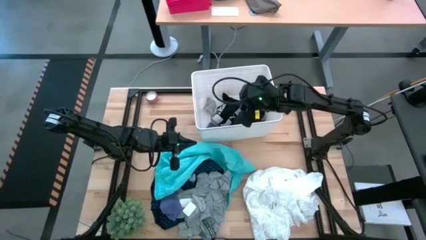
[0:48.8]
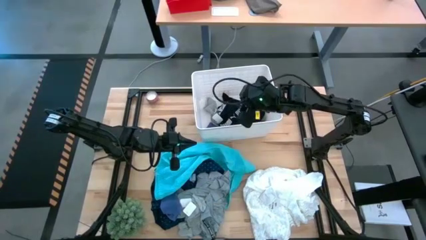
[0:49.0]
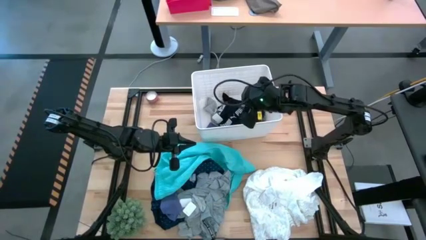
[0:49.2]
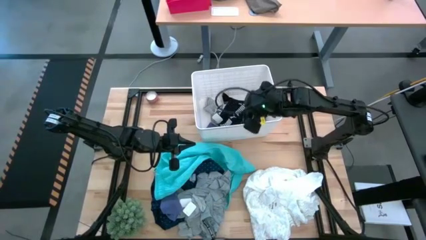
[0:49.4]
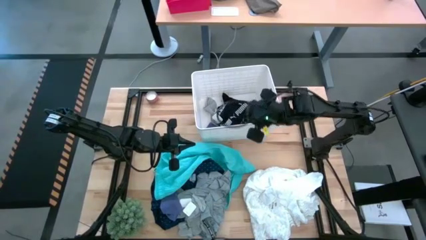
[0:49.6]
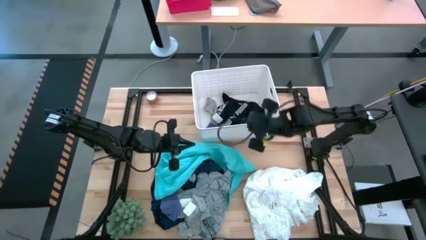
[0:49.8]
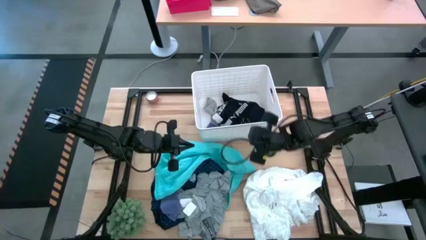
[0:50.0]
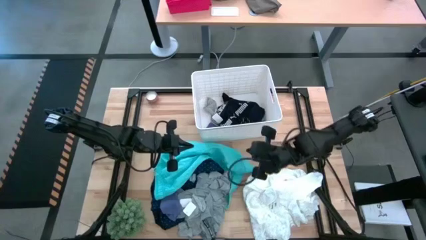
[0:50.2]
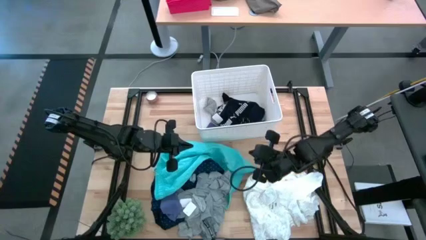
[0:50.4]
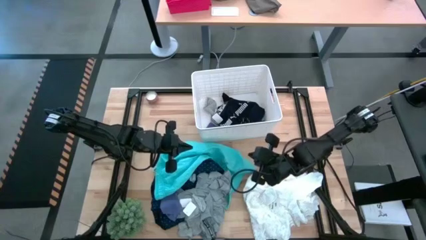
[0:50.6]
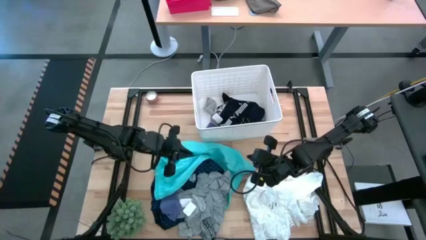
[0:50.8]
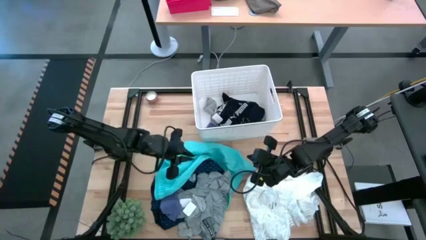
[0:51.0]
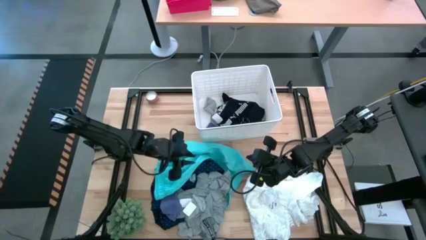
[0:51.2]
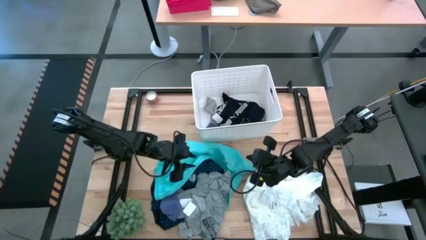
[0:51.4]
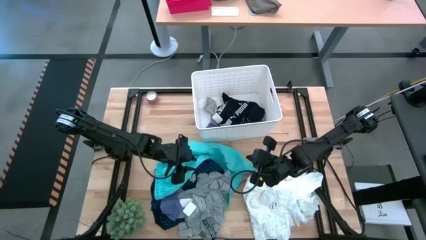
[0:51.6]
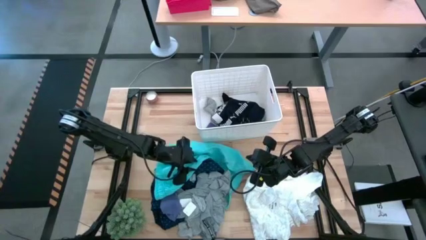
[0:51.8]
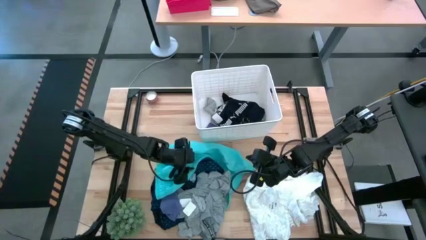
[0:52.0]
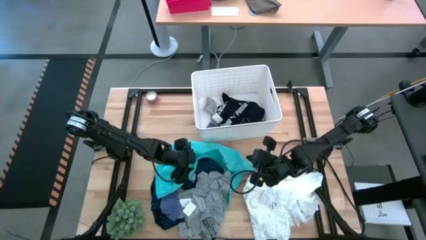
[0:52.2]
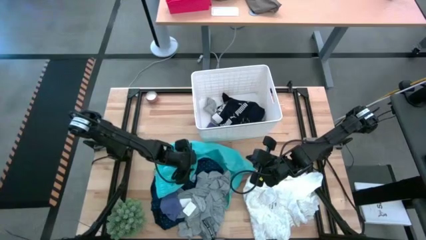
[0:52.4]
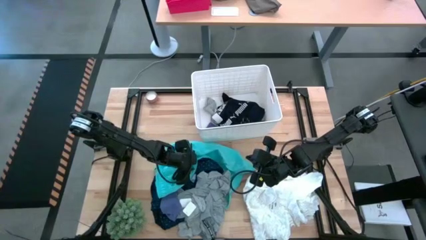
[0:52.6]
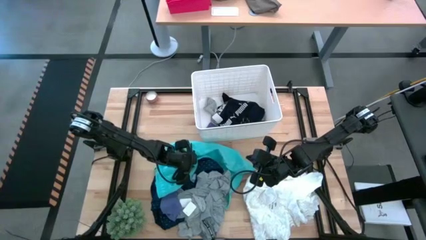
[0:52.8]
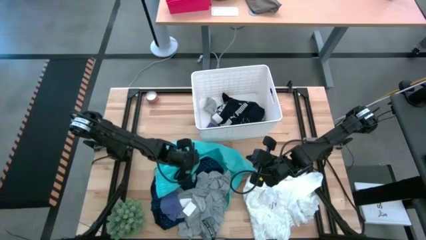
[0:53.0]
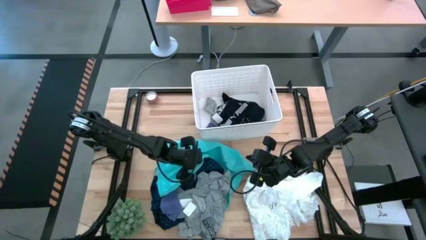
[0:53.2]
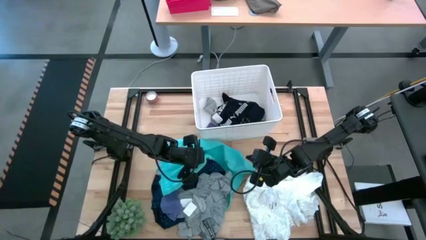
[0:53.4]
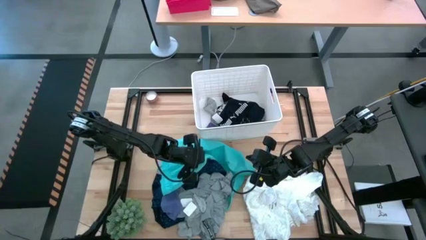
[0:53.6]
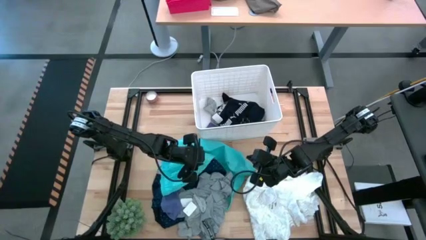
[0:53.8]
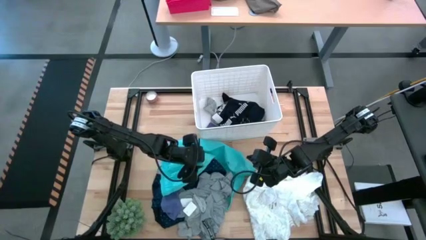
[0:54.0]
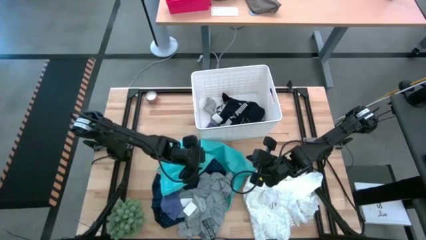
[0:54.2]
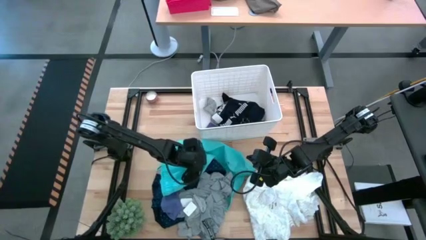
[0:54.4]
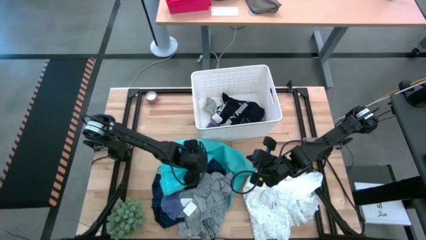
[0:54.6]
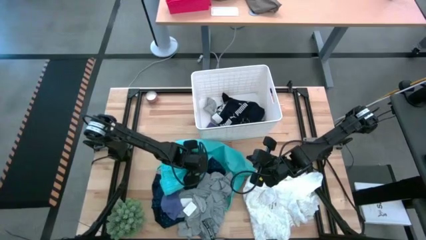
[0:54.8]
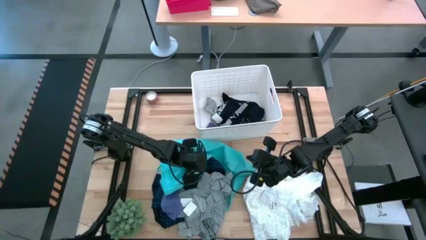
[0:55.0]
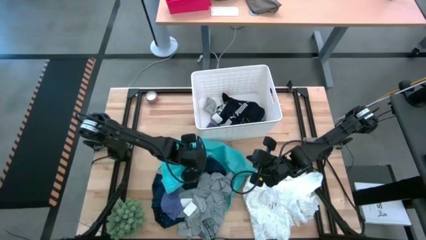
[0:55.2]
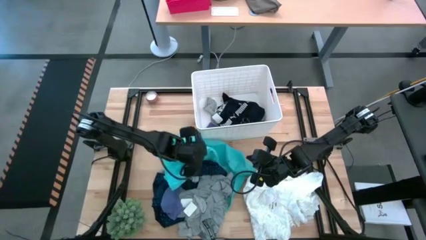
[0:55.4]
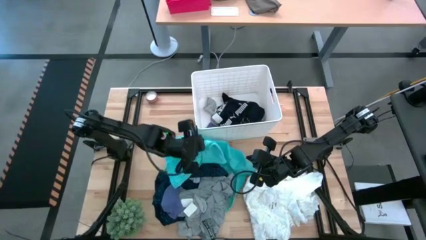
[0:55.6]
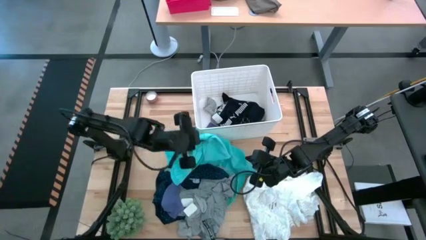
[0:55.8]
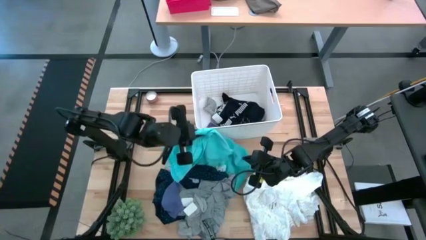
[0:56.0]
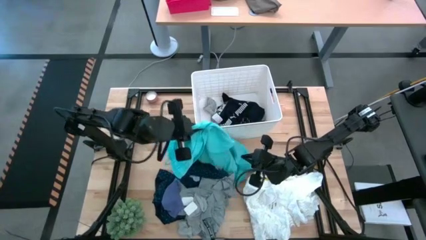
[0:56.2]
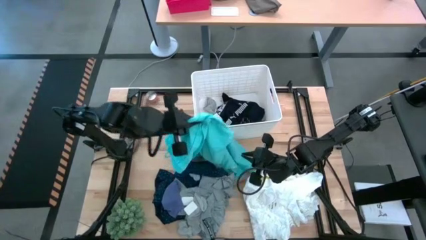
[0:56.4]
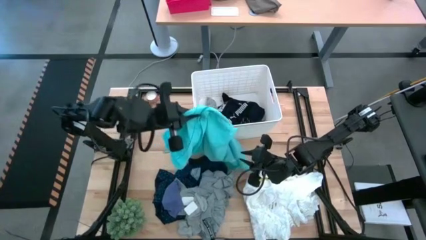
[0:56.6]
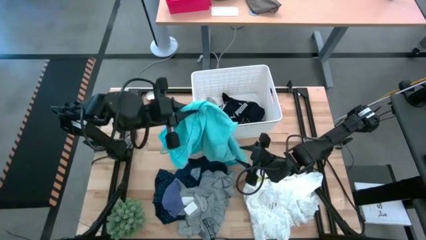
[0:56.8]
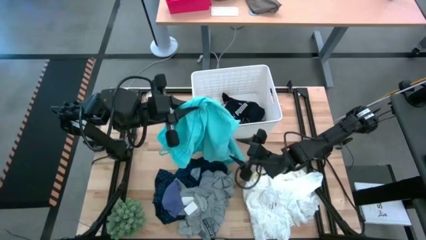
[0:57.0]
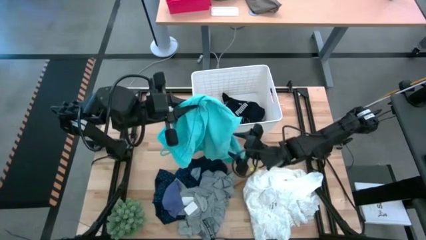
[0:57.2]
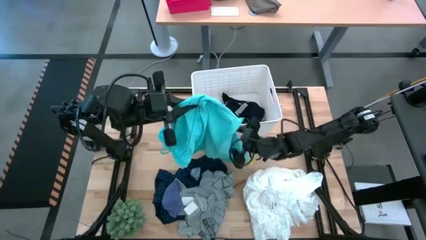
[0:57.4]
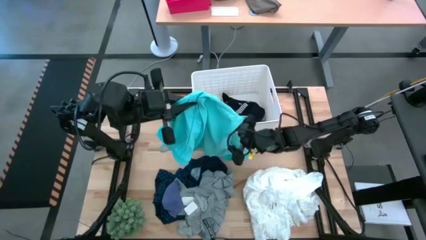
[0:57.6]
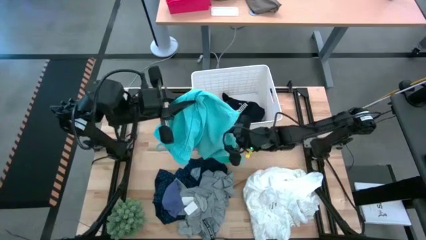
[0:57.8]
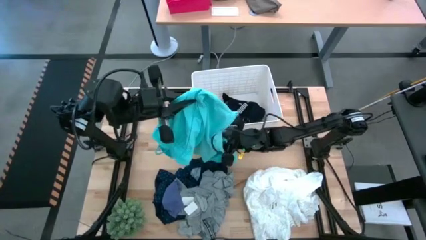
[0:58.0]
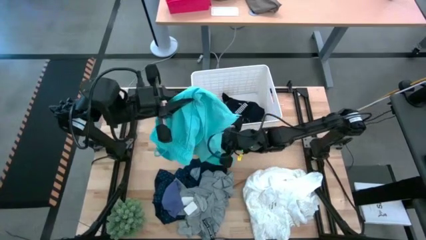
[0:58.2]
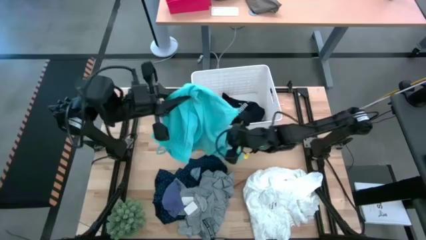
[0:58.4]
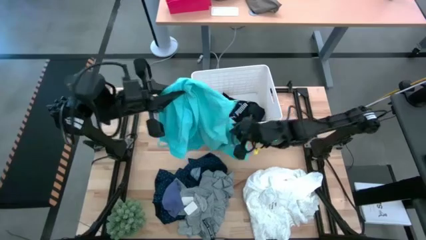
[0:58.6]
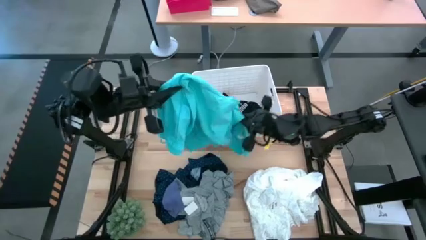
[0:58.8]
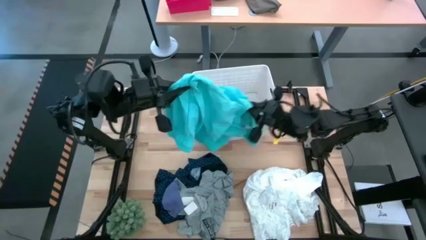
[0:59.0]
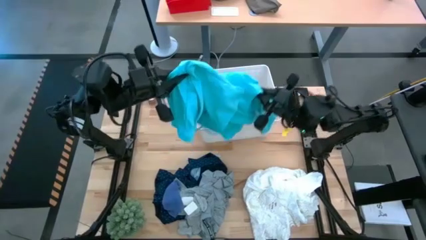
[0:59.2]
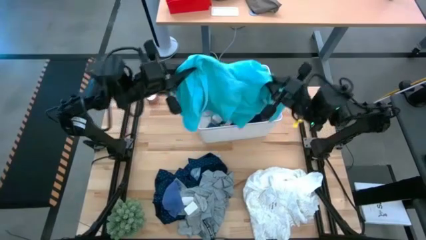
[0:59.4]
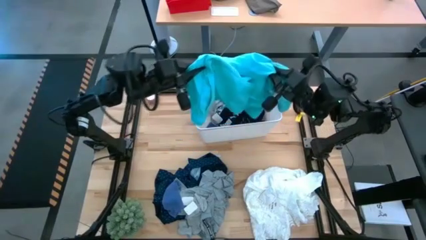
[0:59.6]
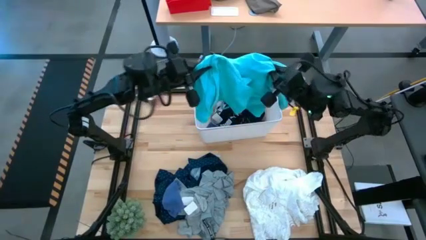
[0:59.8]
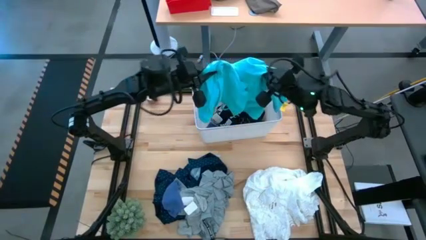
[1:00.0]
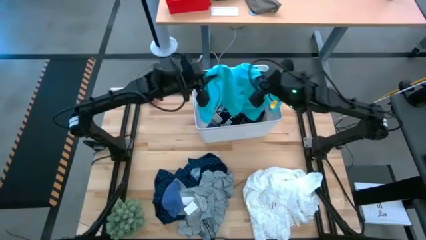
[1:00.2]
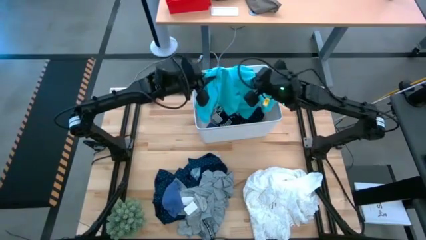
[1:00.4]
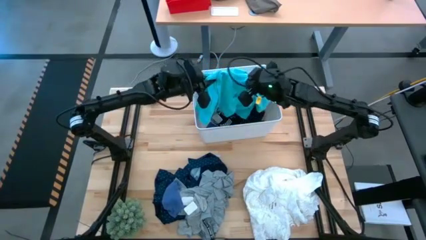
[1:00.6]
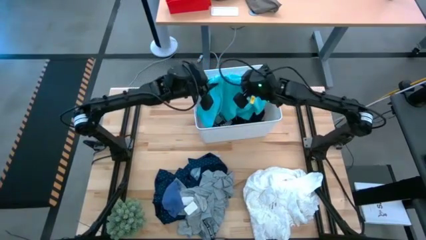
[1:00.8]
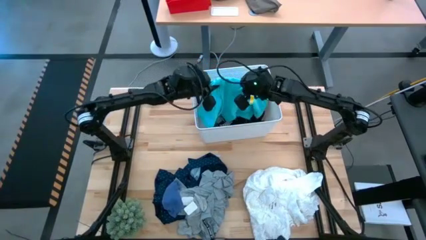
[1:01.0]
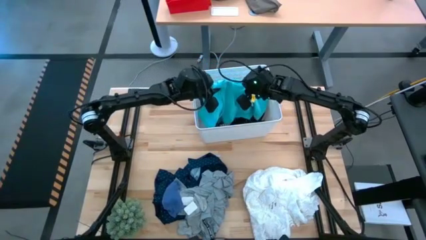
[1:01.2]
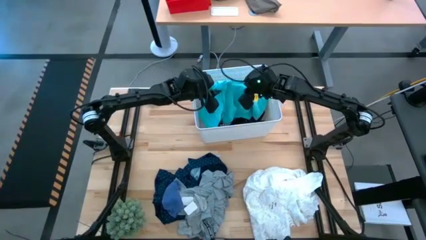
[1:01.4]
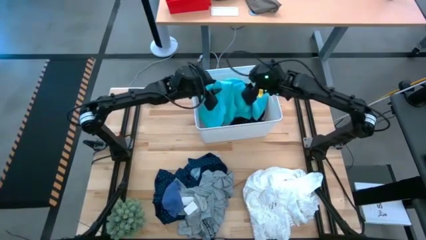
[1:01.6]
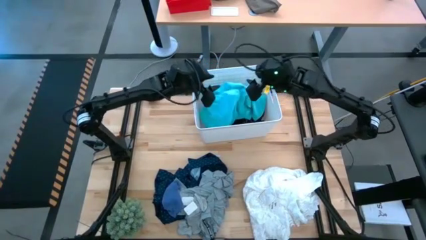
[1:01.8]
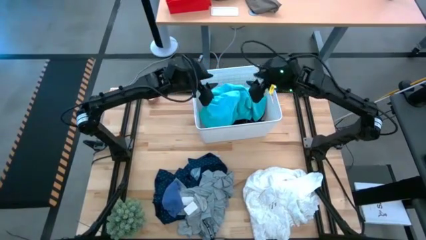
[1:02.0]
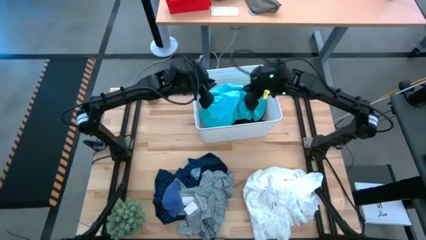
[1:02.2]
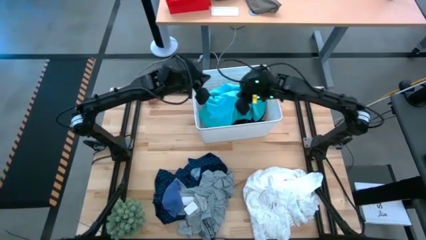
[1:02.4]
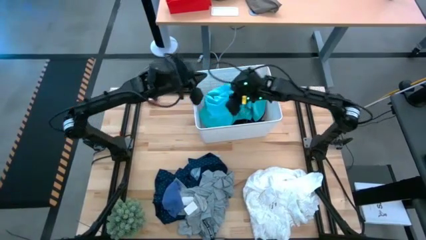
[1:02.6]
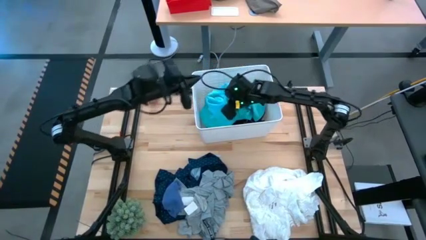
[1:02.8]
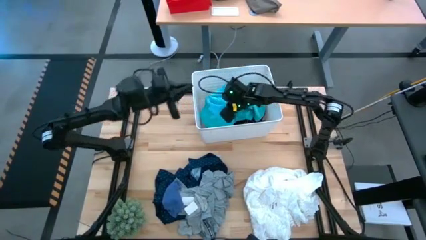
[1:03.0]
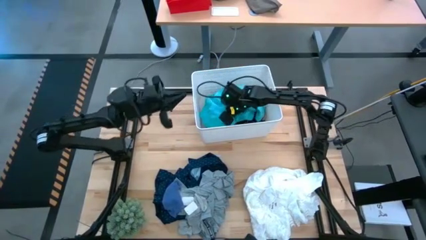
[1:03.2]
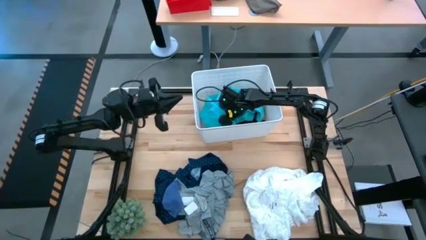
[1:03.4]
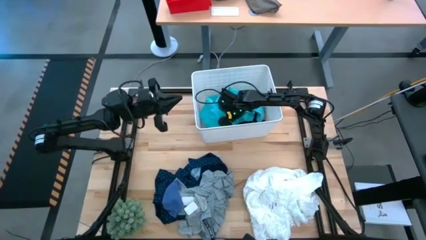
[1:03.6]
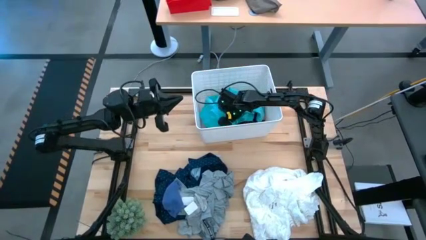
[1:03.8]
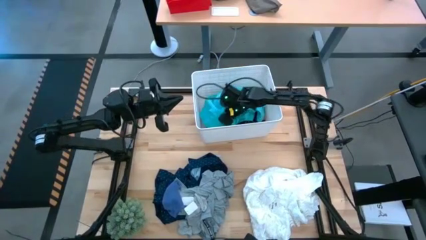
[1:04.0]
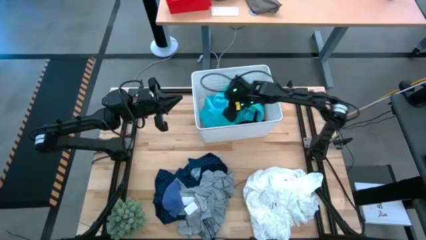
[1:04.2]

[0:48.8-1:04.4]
Task: Sort clothes
Put the blue blouse in the bin
